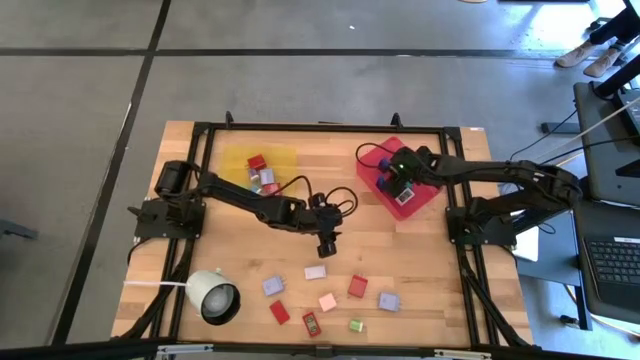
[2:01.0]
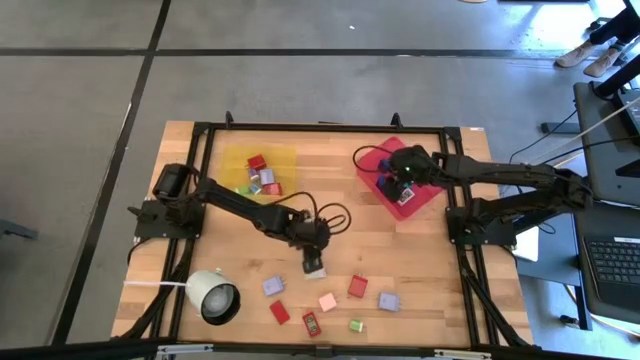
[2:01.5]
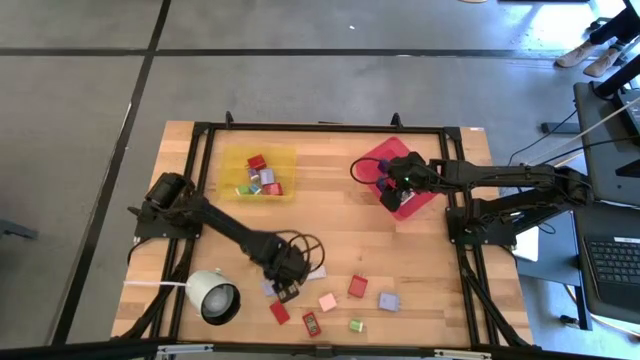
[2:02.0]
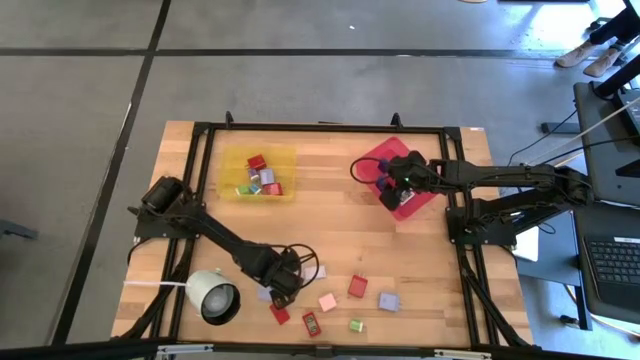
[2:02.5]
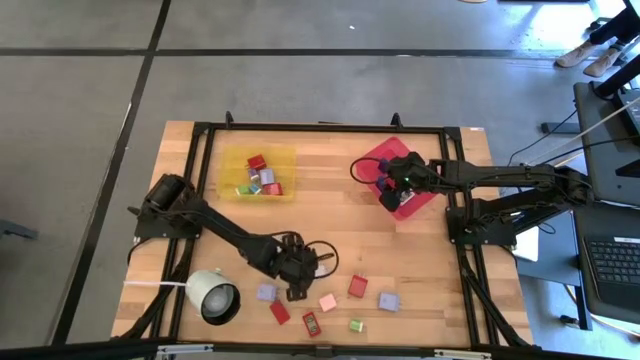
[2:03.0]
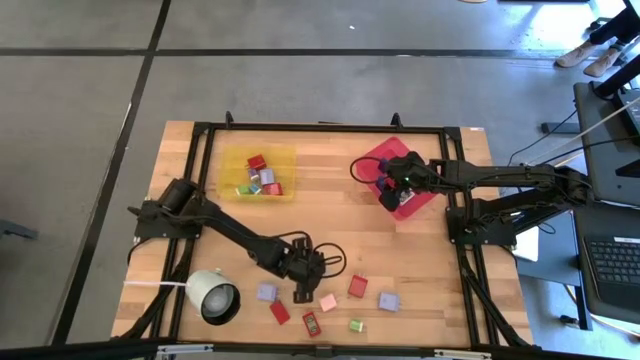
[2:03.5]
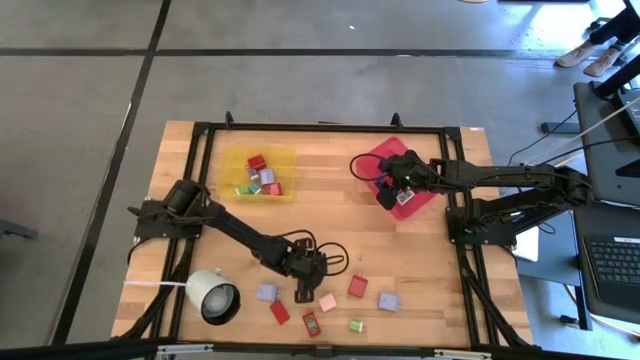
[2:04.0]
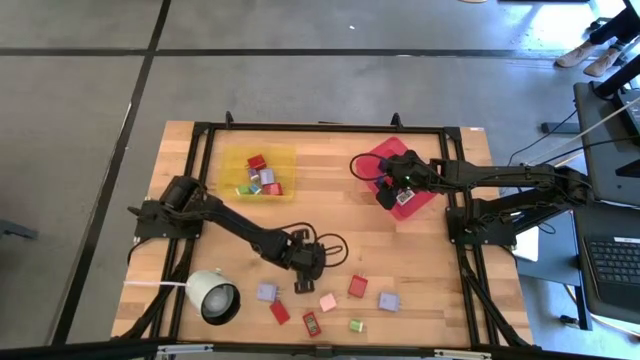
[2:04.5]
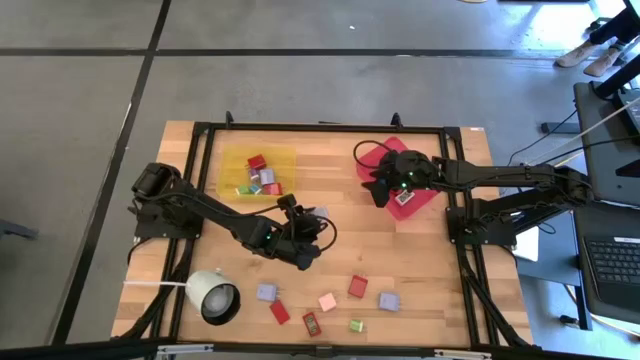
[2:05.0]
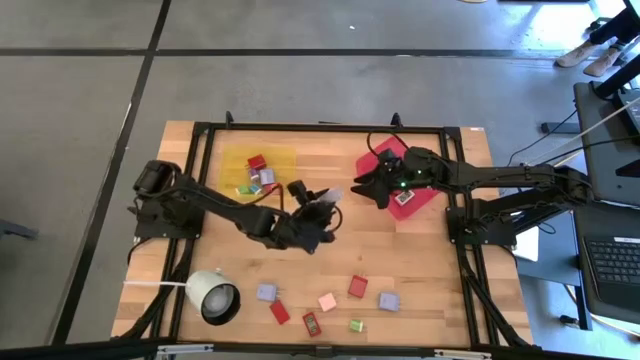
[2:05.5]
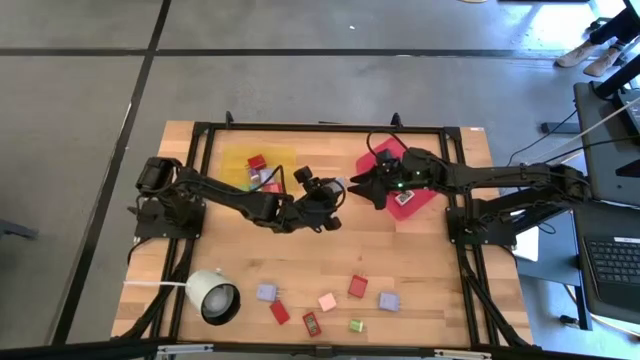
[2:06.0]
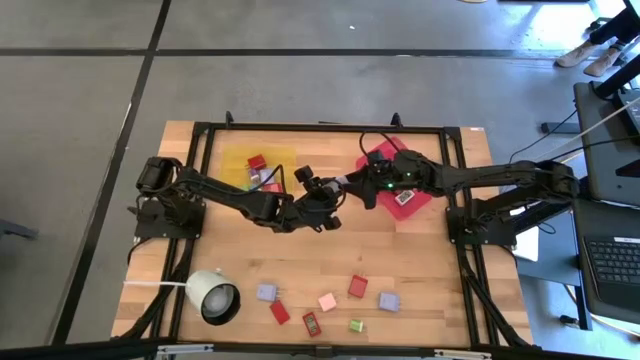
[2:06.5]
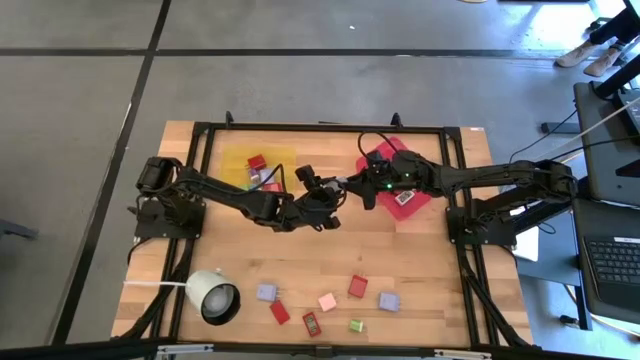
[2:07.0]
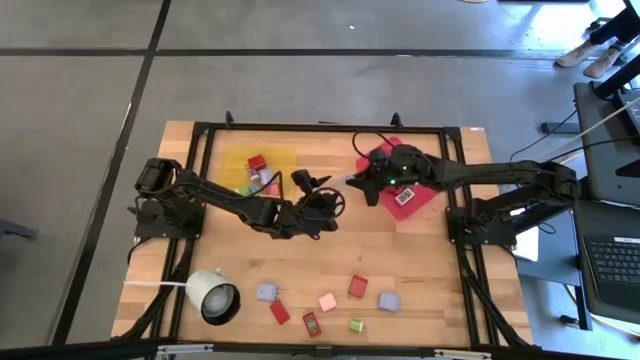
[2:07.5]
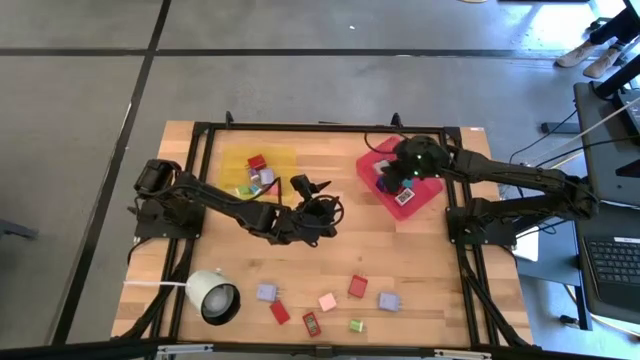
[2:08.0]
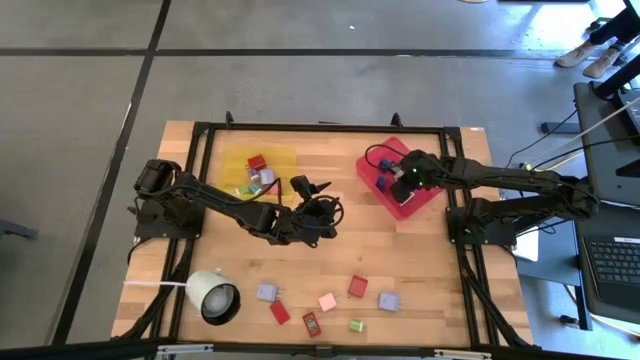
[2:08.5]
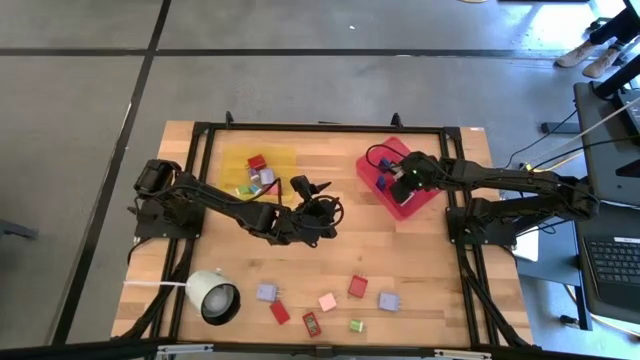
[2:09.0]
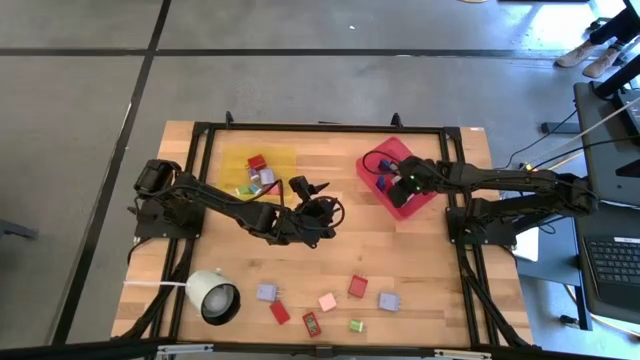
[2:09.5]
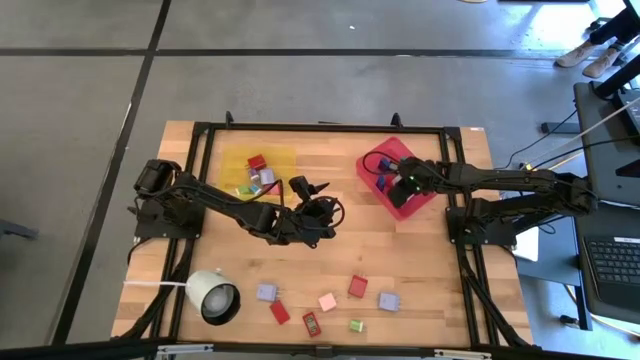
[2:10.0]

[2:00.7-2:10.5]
Task: Pick & Place Office items
Put the white digital clock into the pink bin

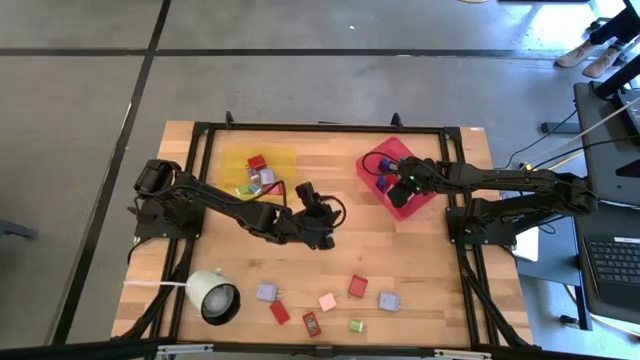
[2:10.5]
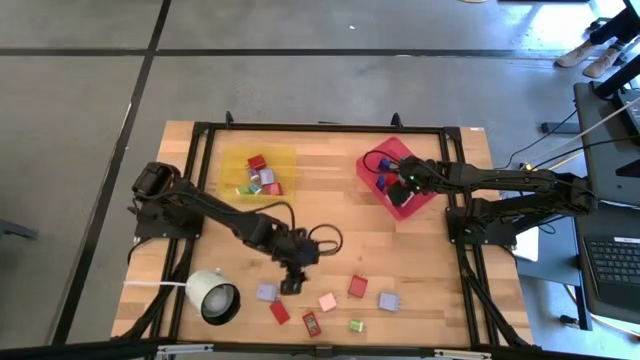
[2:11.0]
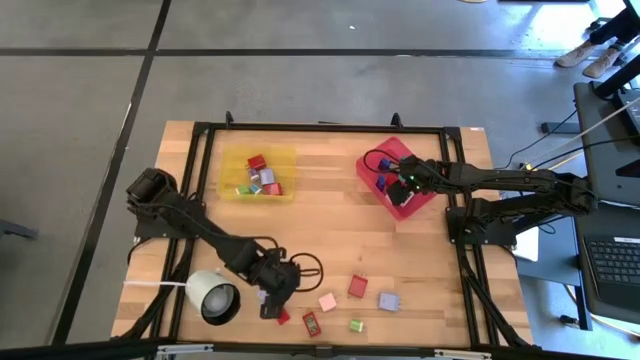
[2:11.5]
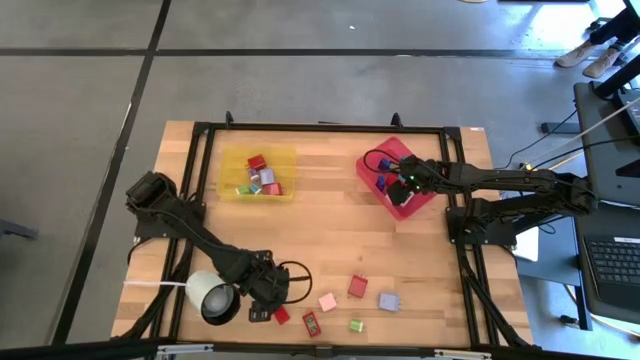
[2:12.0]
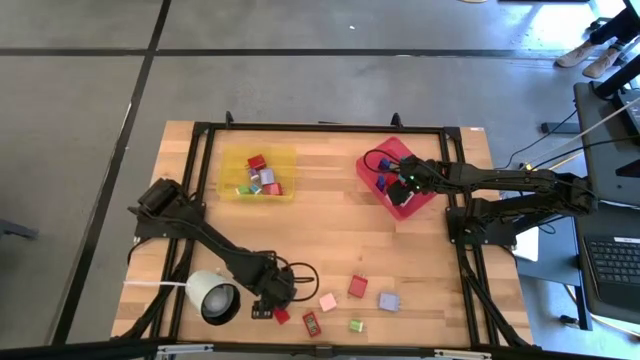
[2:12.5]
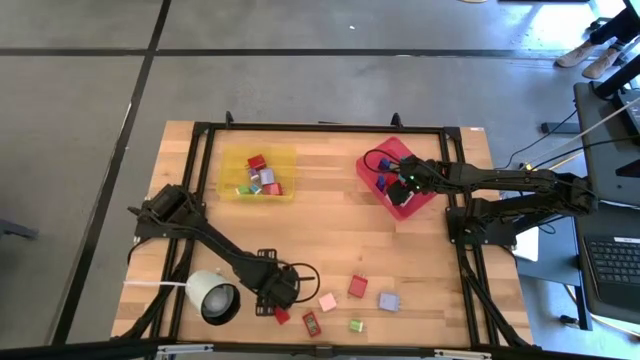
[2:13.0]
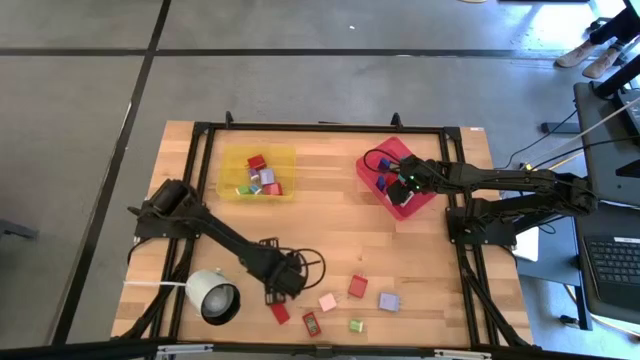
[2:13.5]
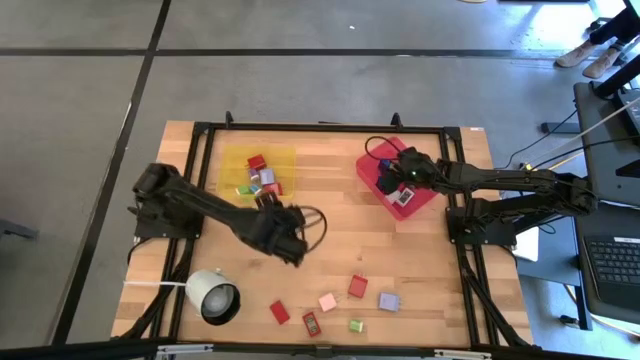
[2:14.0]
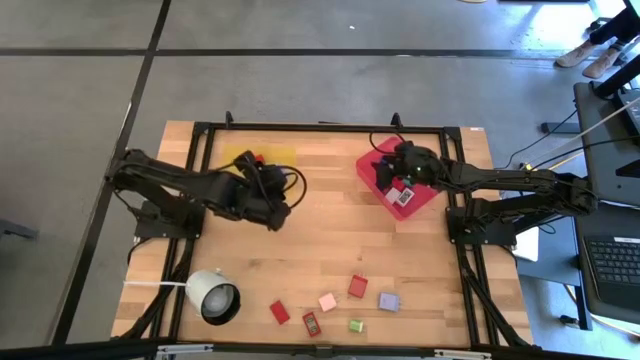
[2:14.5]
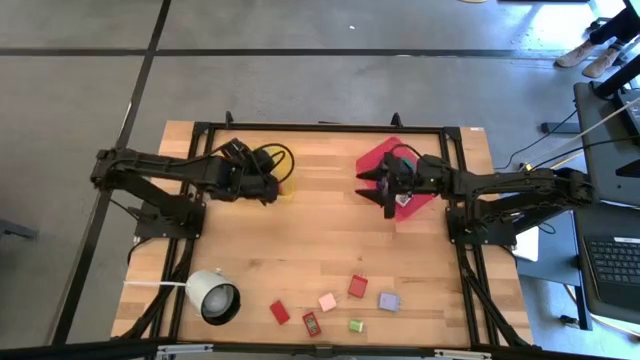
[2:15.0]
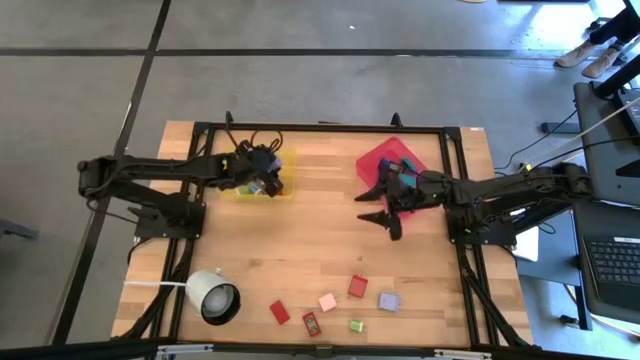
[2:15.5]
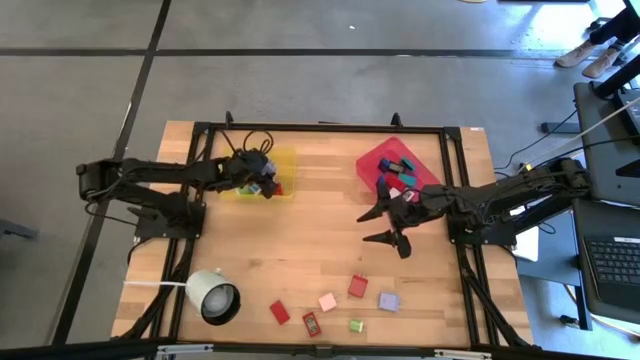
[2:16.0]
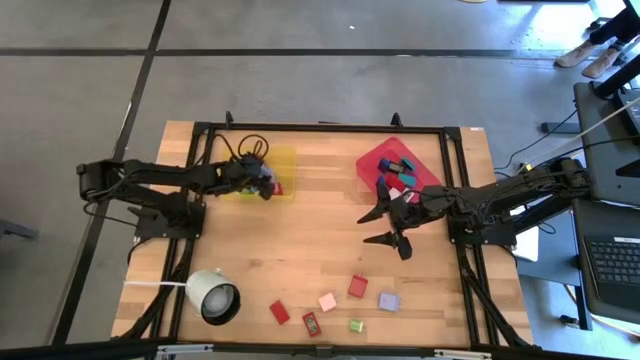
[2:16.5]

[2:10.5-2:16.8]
Put the left light purple charger adapter into the yellow bin

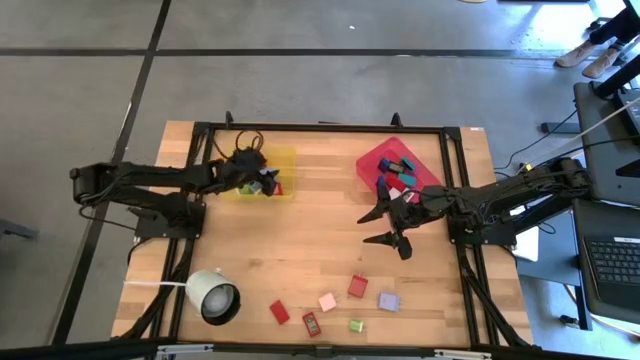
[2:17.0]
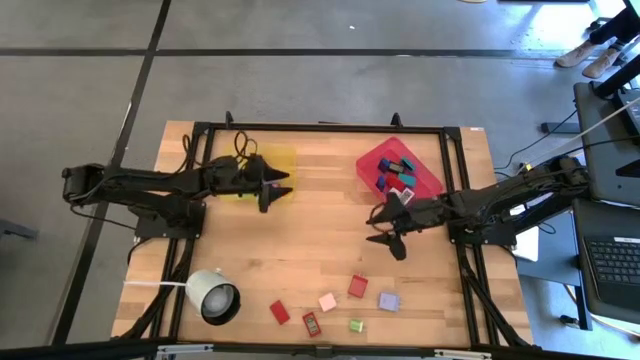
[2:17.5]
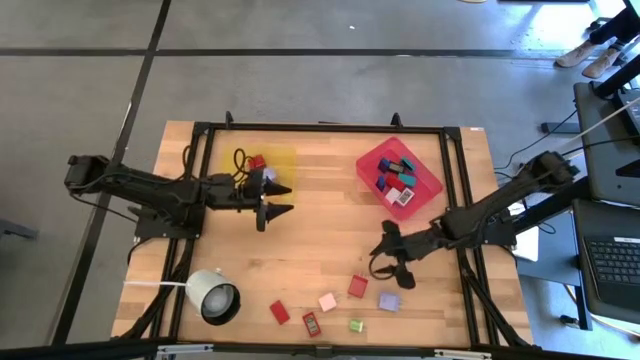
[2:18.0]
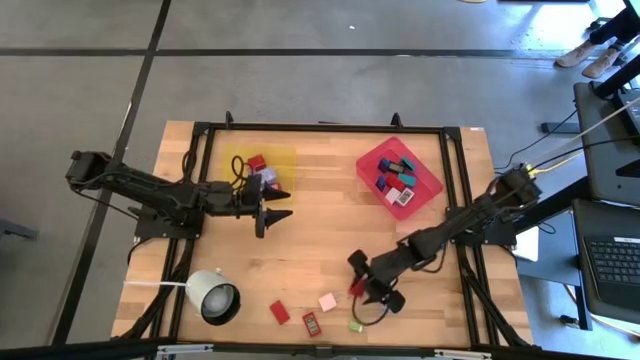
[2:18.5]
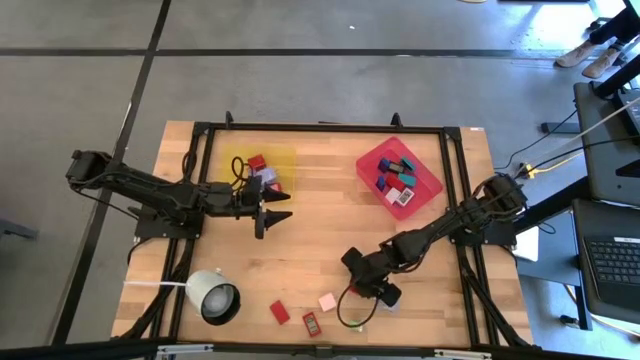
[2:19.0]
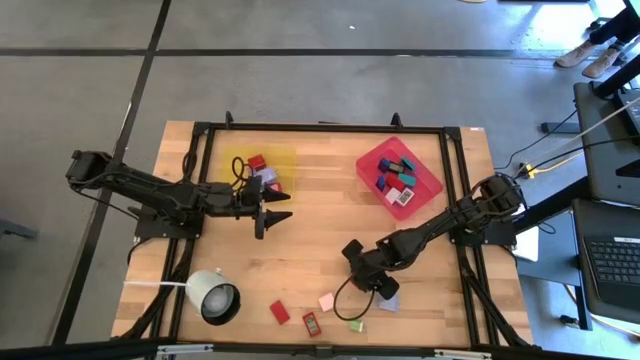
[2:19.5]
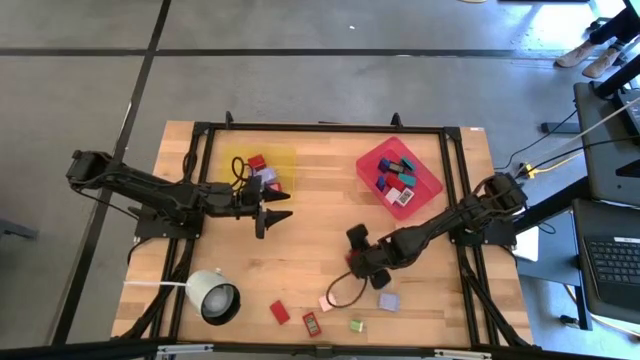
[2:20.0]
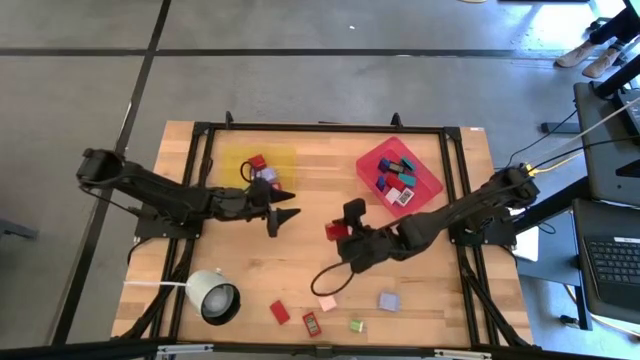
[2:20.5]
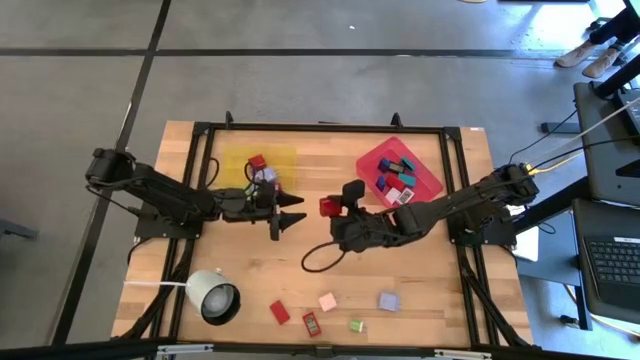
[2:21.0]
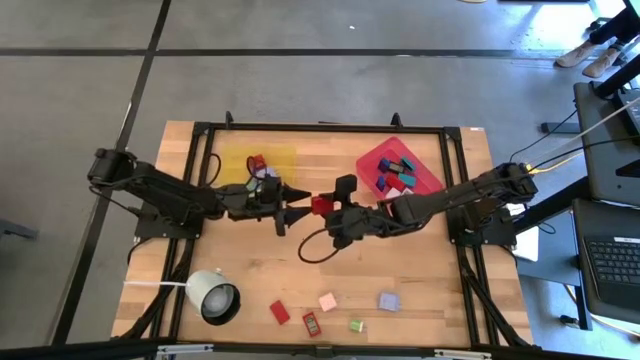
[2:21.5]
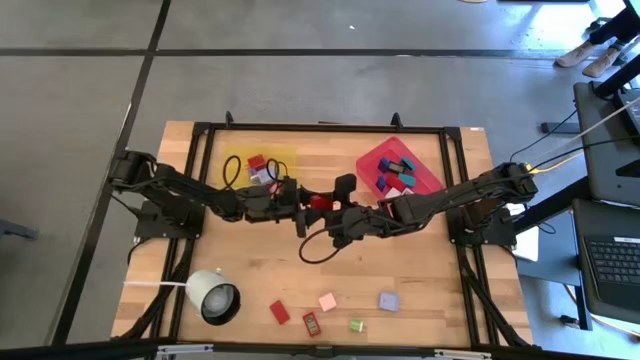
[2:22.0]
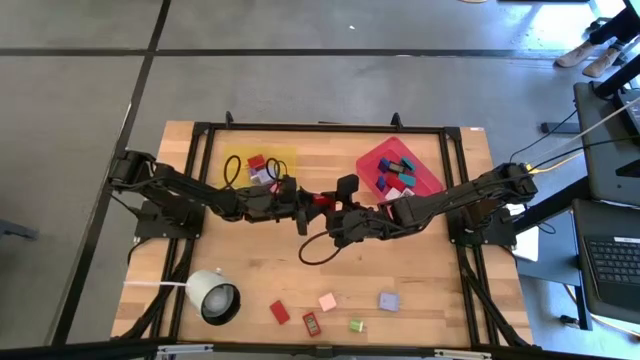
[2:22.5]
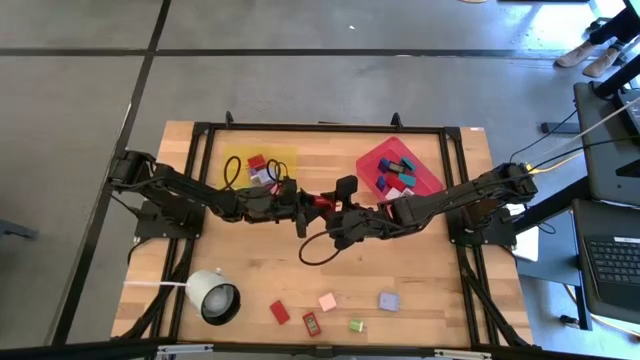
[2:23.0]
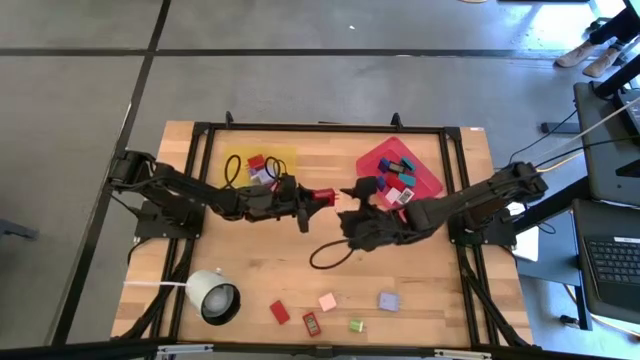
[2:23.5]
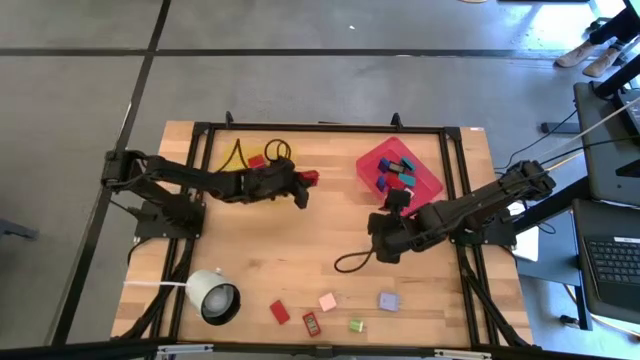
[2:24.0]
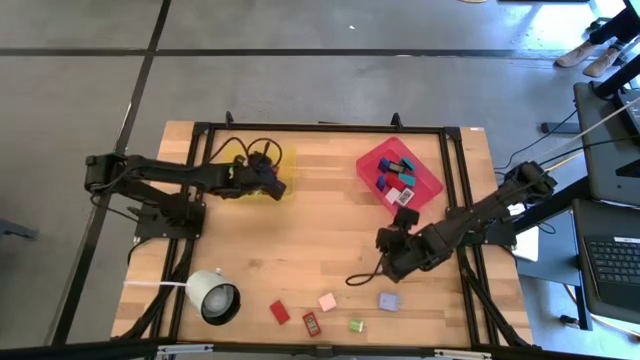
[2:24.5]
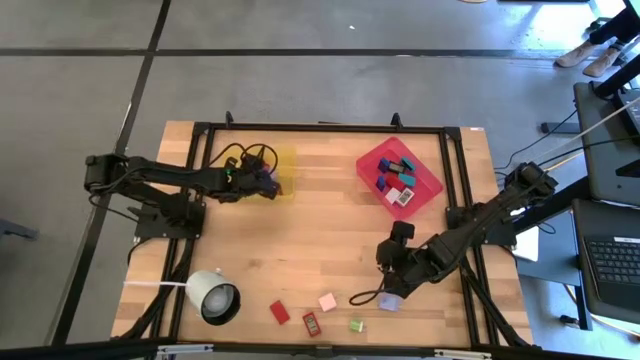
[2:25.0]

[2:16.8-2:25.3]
Put the red charger adapter into the yellow bin
